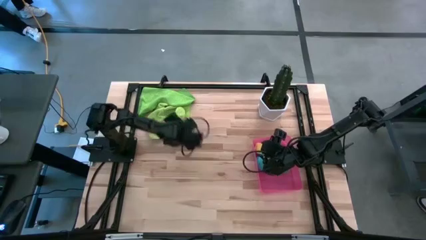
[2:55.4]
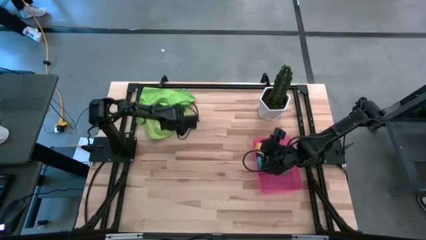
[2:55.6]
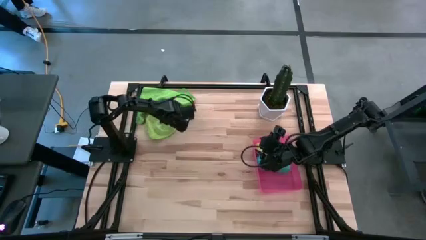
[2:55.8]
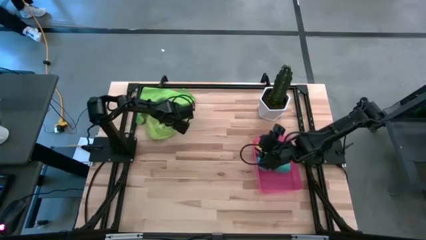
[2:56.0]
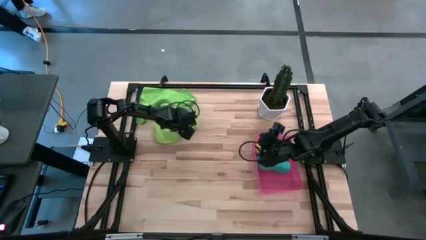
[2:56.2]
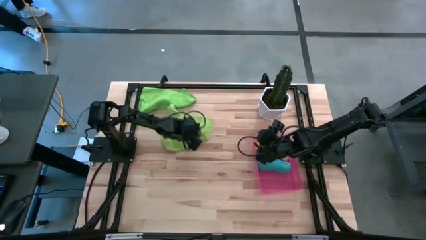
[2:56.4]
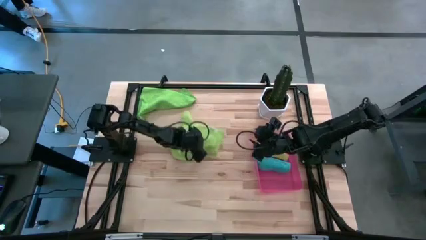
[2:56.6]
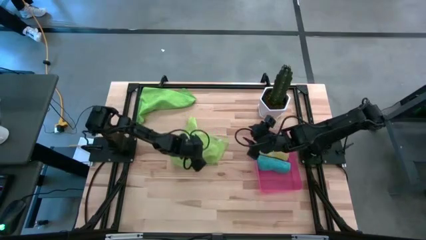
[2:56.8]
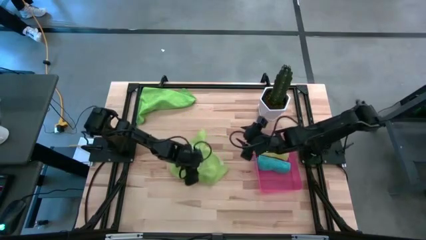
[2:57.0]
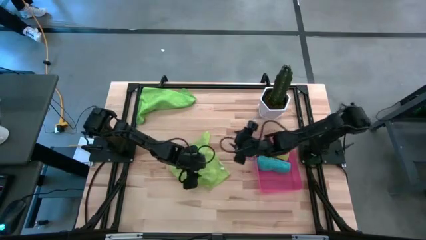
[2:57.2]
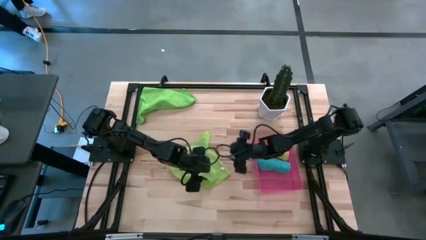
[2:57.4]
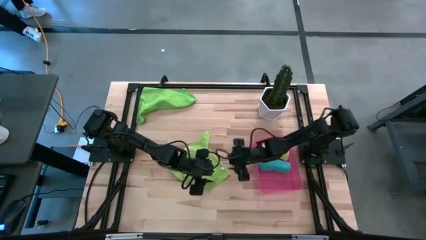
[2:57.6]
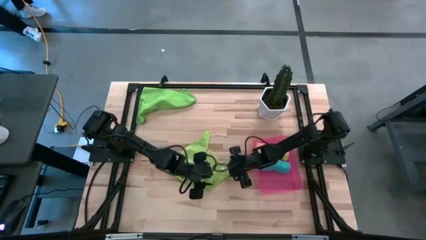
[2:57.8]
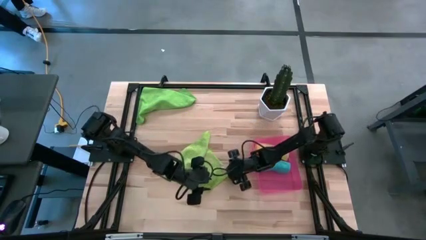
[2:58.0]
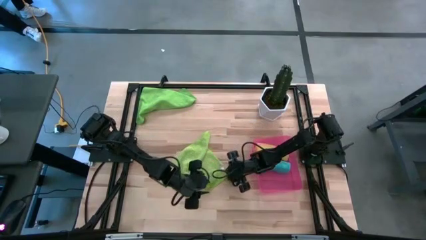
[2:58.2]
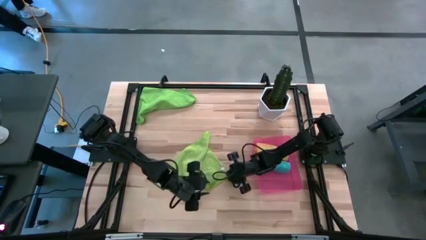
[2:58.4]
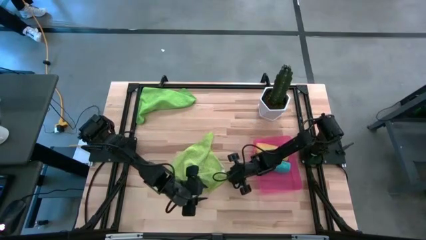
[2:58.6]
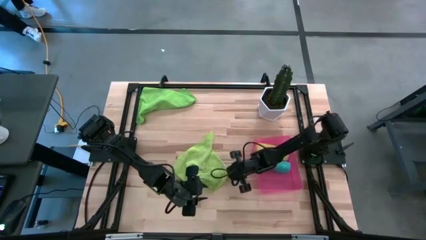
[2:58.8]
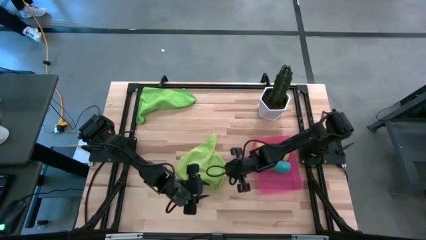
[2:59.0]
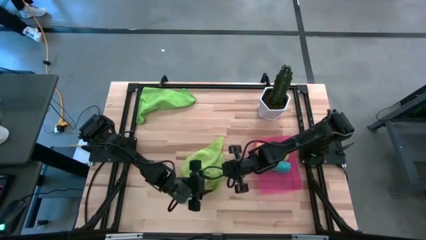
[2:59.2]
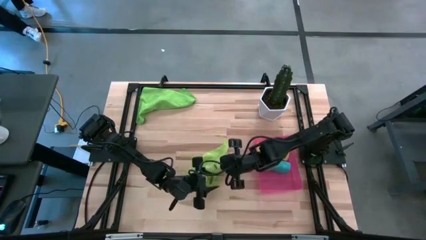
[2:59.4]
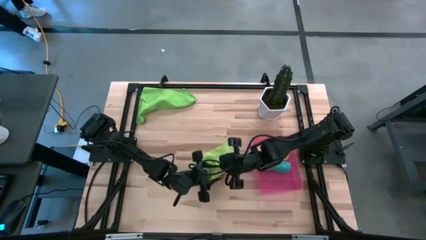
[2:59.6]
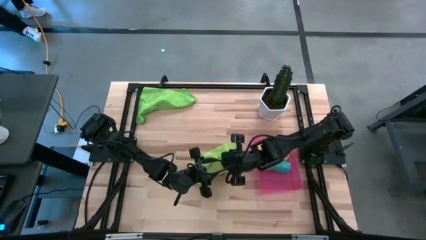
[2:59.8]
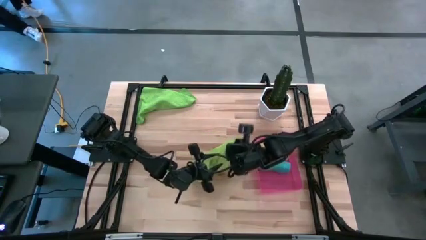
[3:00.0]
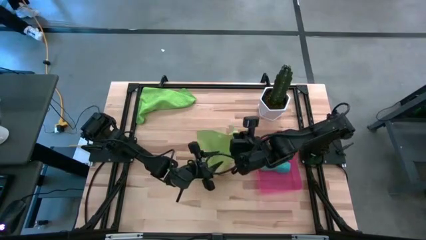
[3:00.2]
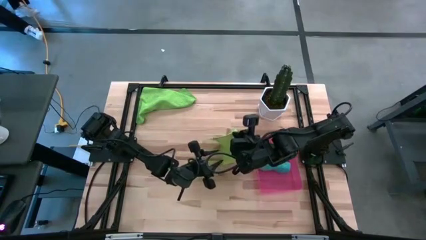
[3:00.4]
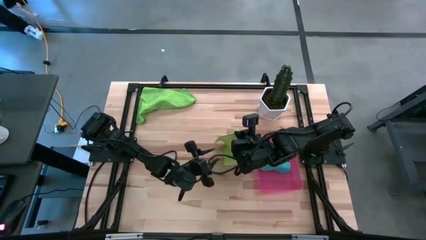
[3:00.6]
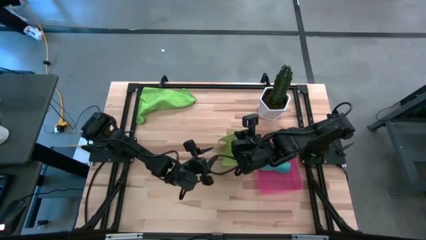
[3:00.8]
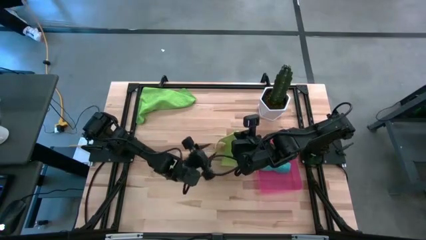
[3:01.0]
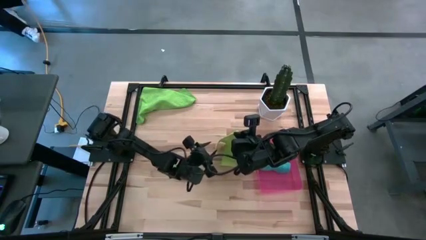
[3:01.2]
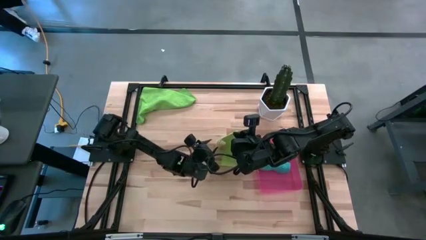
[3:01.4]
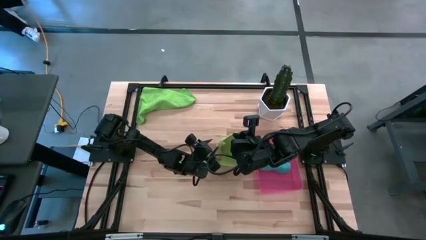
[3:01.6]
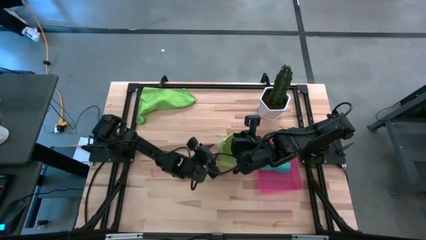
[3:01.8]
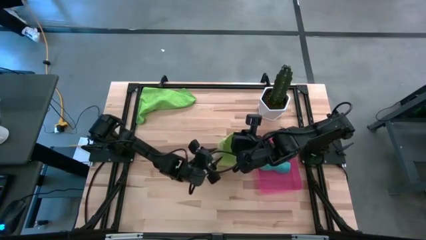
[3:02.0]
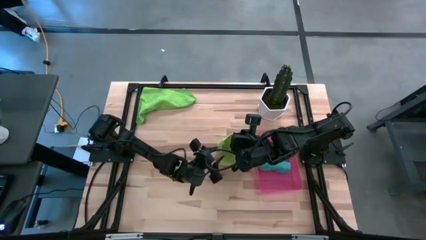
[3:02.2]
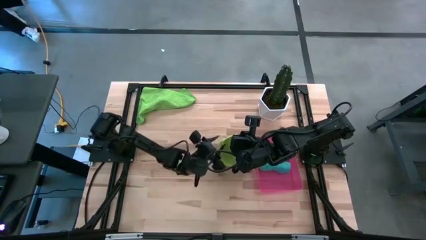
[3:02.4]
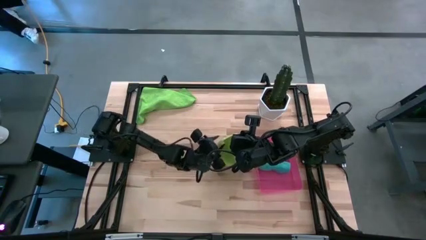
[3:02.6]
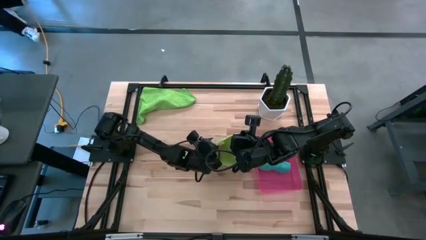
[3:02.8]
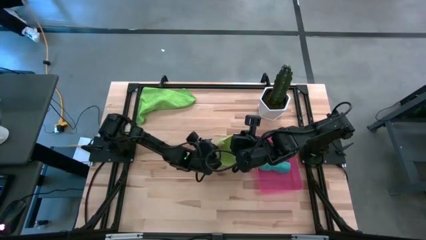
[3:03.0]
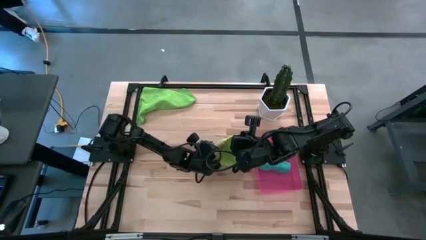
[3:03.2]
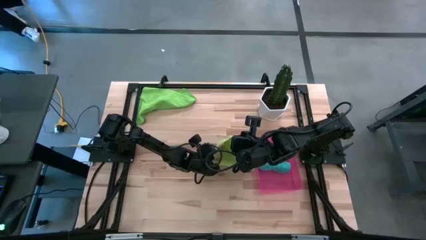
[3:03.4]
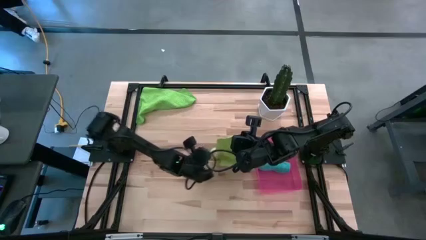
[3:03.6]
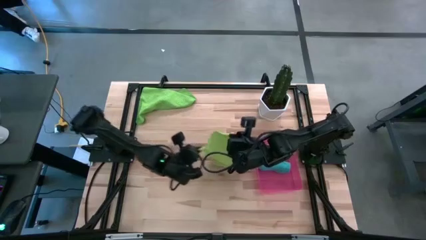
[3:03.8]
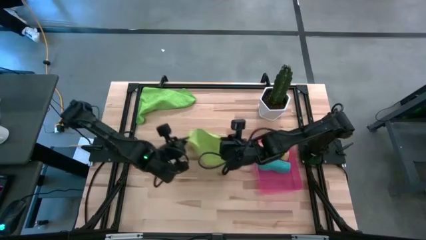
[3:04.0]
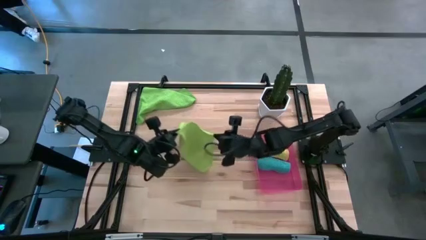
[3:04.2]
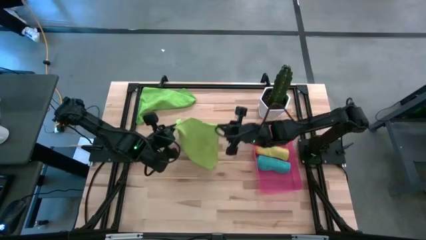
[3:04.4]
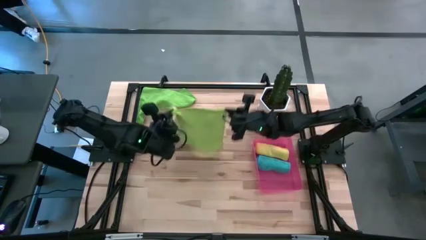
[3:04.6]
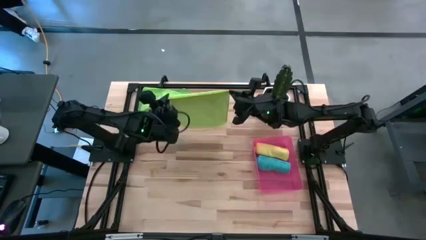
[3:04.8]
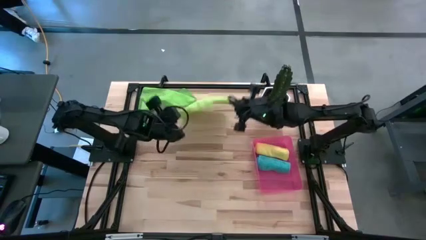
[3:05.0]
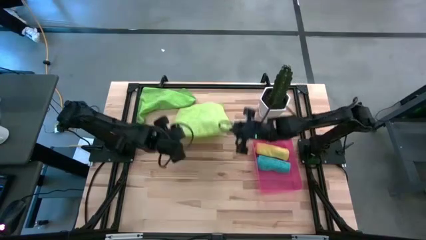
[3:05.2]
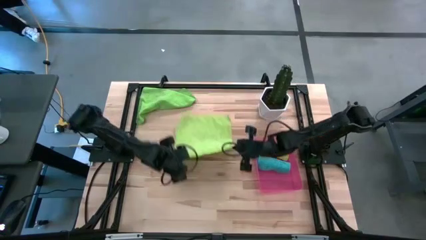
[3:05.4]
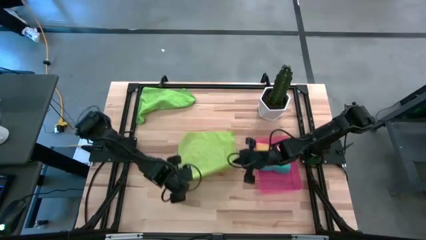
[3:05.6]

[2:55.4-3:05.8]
Task: Roll microfiber towels into tight, uniform cylinder then place into a basket
Fold the bottom light green microfiber towel

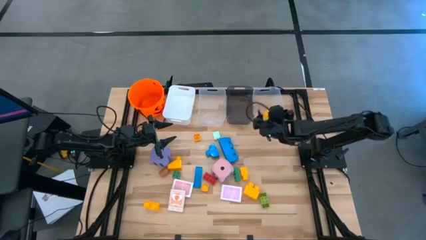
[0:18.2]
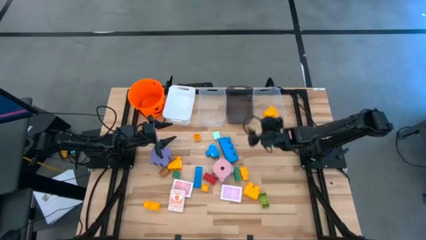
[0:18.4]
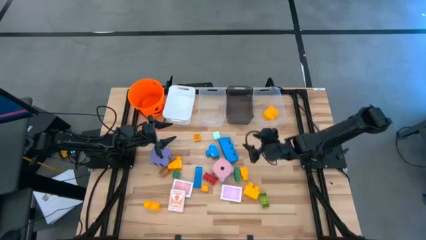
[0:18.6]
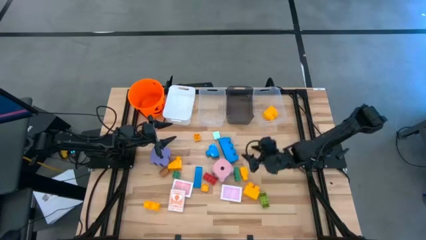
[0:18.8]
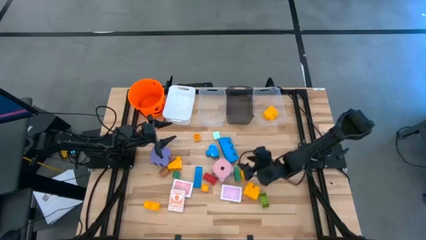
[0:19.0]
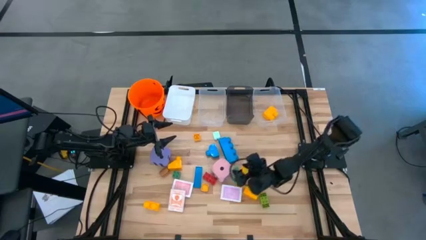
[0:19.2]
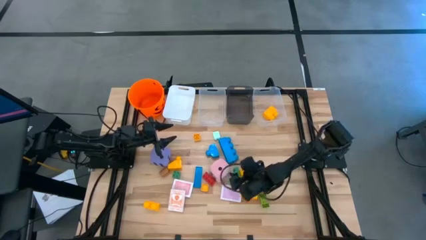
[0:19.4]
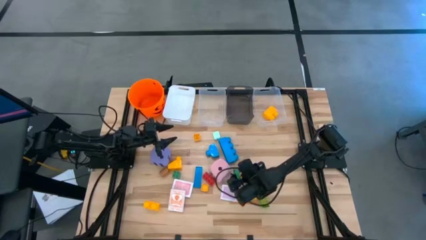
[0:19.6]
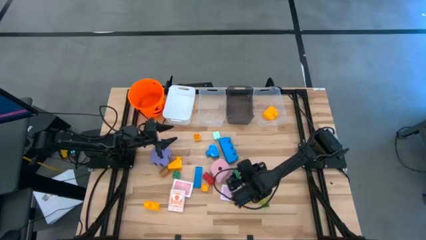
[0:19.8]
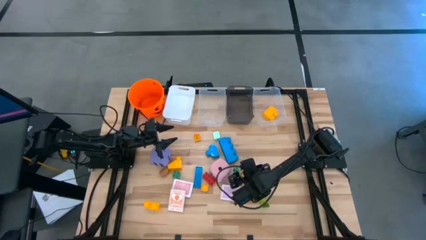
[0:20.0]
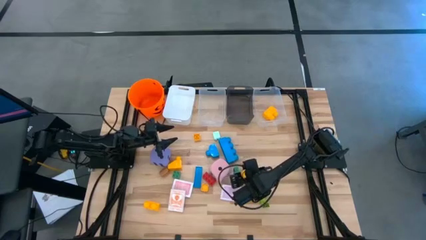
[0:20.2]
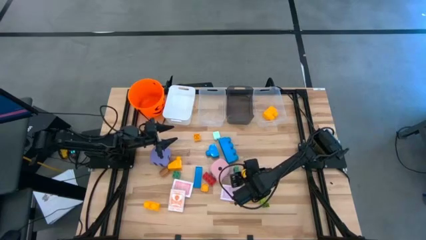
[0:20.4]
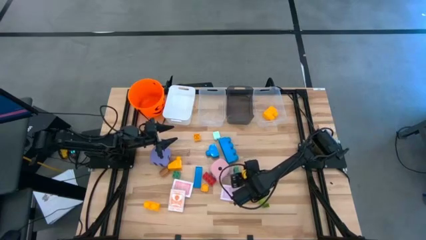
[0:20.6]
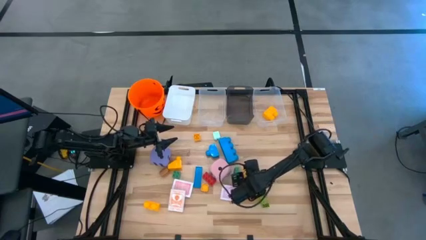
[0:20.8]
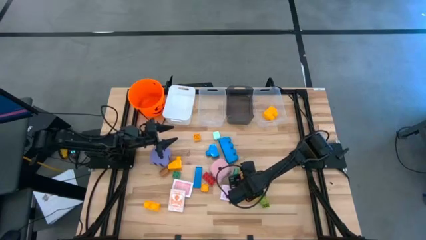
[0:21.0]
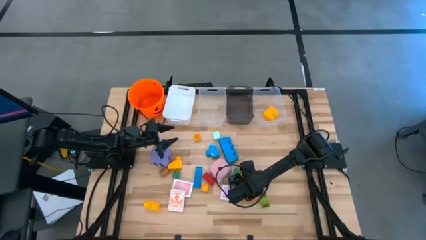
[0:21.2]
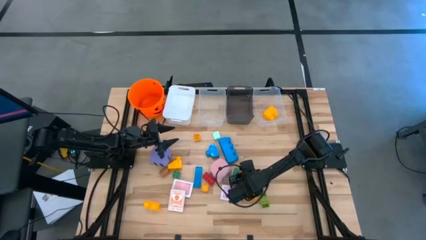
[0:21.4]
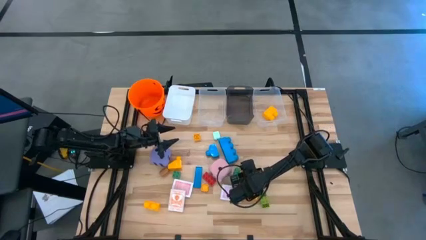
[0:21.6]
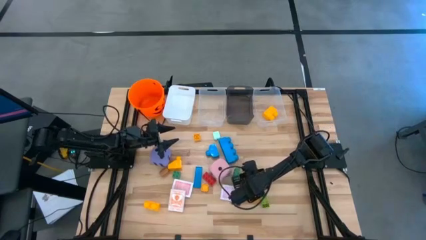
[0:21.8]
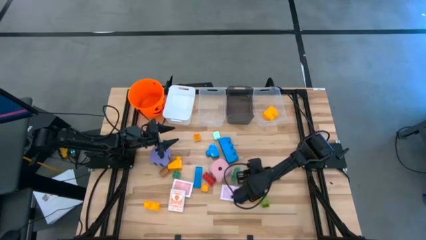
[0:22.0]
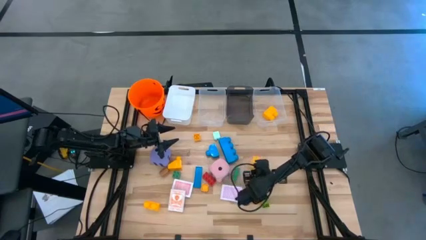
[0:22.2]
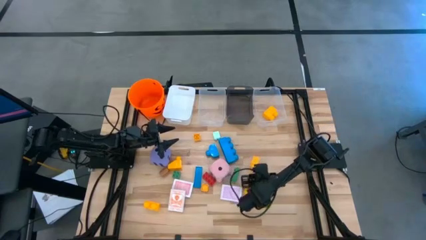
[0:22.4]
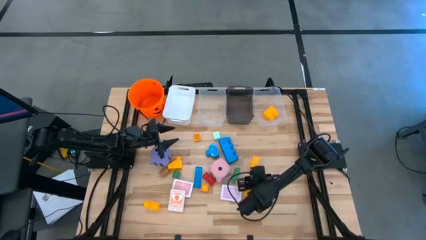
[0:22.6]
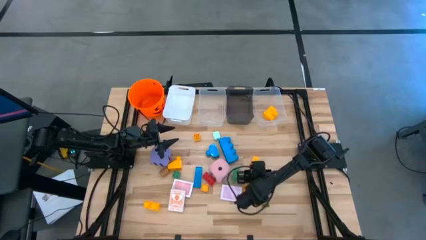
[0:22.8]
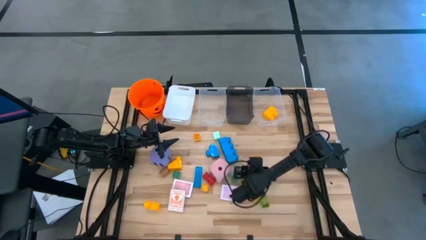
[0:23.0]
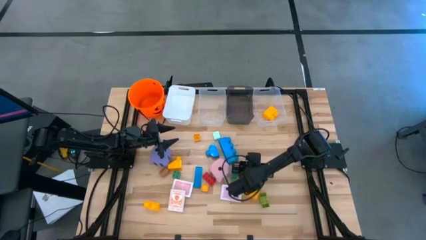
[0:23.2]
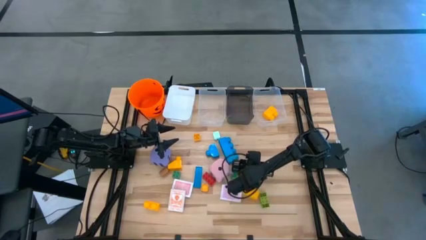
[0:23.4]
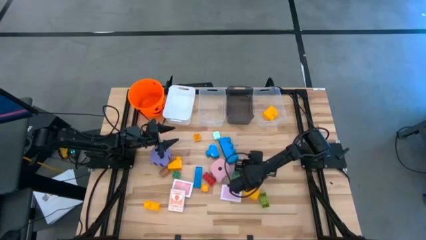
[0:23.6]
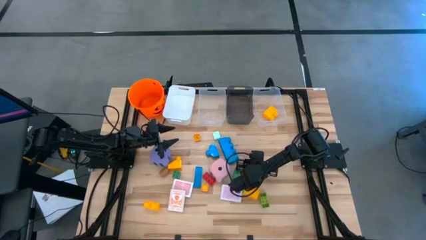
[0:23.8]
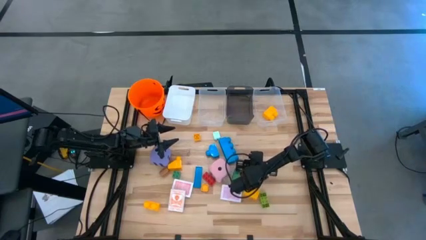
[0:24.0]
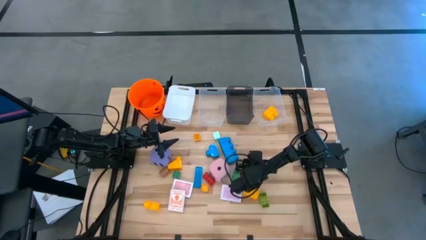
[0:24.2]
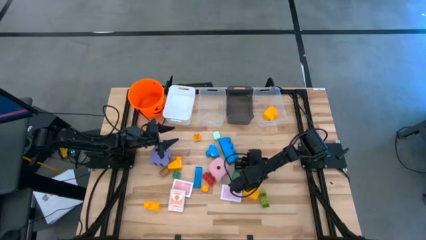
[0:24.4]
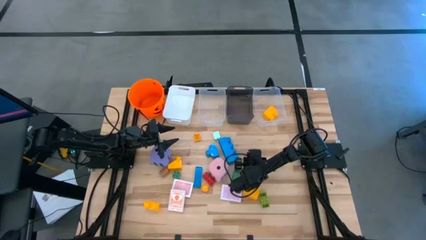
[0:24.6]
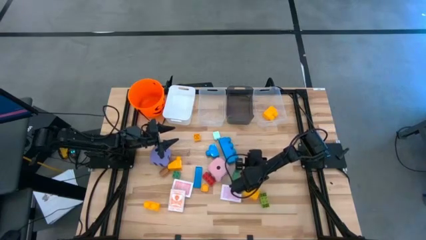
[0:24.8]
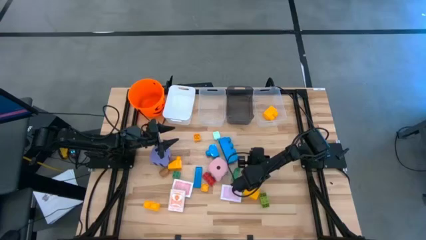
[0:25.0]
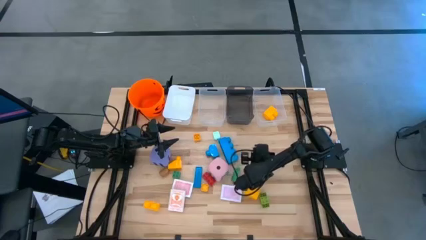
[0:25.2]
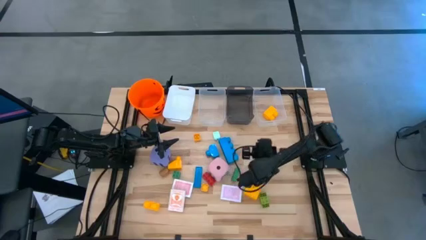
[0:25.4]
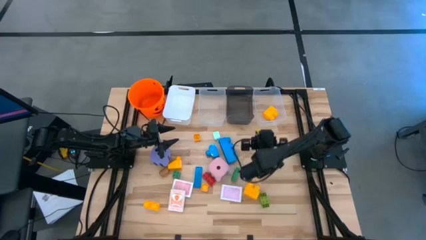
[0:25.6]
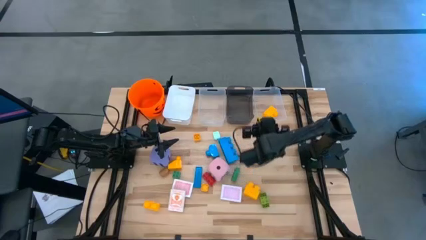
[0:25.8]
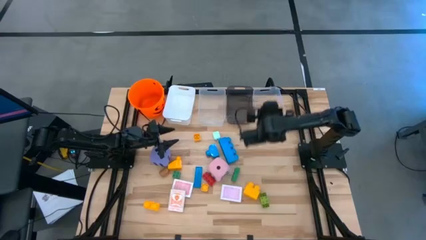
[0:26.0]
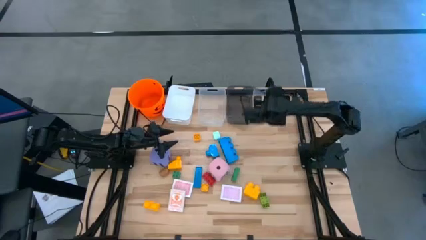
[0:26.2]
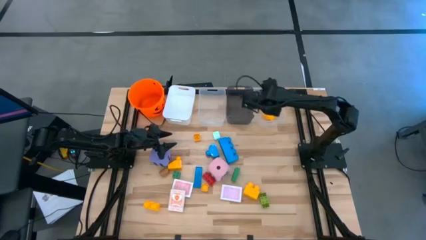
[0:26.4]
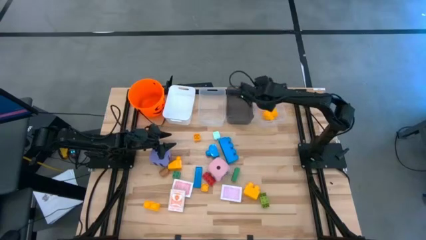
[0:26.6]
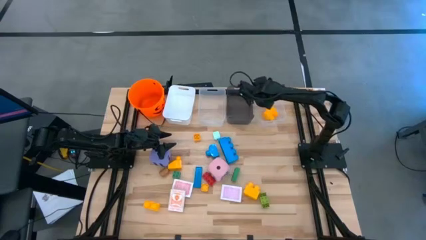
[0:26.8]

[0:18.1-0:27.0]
Task: Pick & Place Toys
Put the big yellow game piece into the right transparent bin
